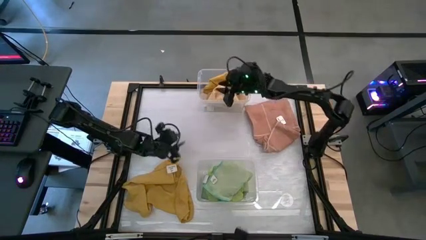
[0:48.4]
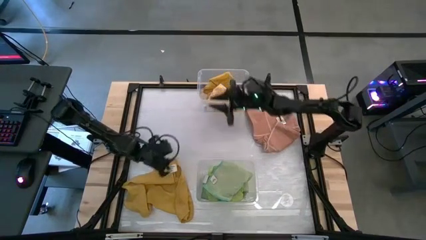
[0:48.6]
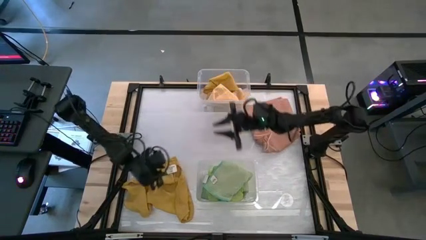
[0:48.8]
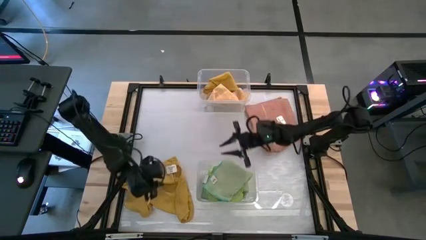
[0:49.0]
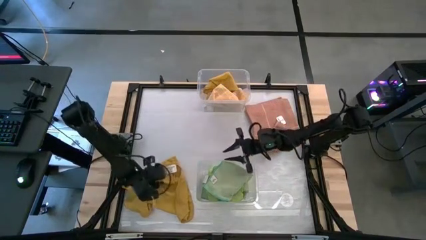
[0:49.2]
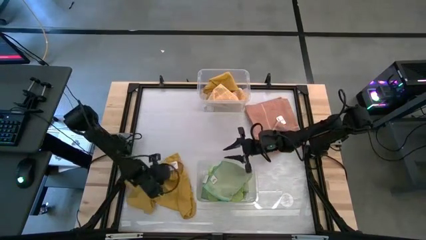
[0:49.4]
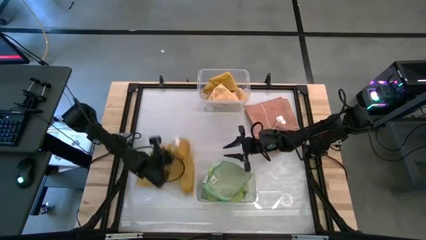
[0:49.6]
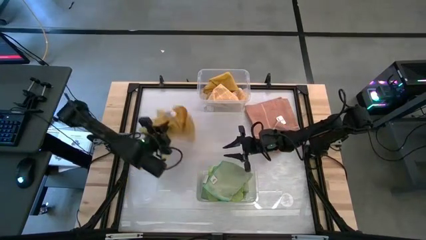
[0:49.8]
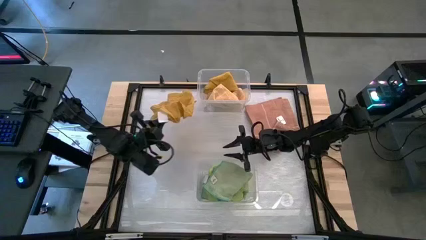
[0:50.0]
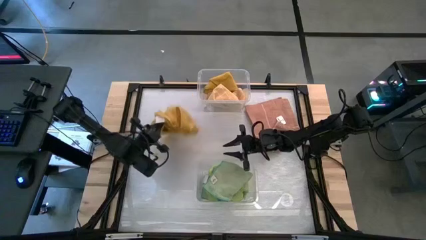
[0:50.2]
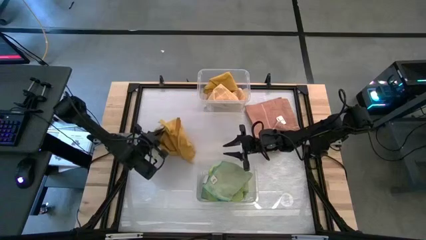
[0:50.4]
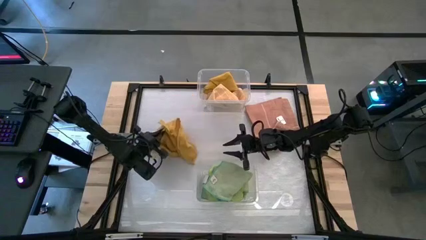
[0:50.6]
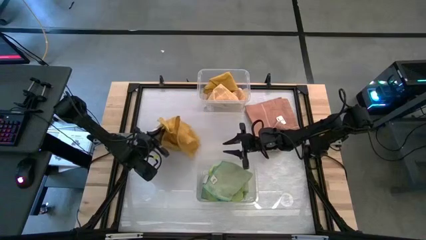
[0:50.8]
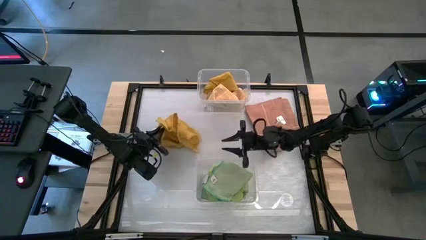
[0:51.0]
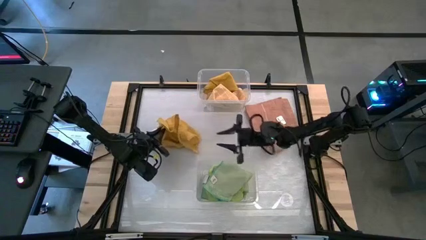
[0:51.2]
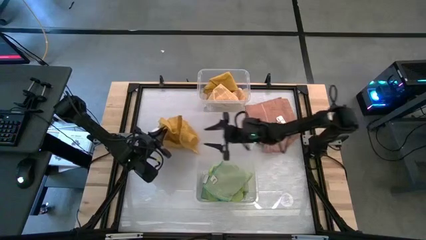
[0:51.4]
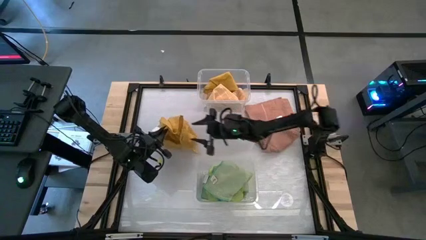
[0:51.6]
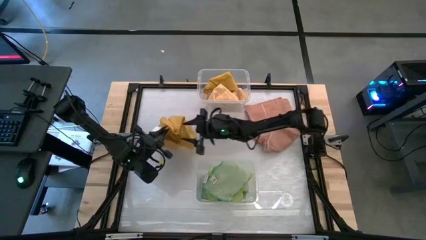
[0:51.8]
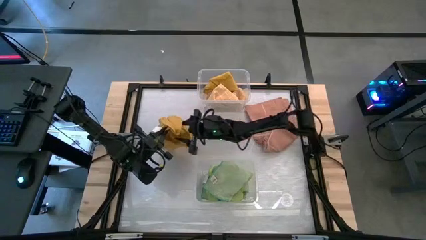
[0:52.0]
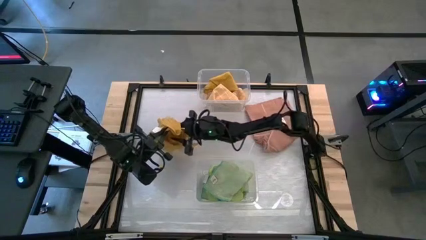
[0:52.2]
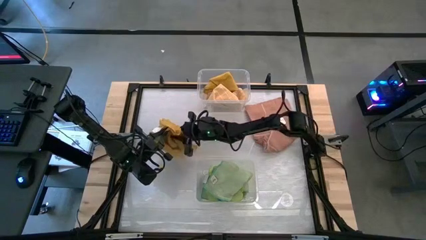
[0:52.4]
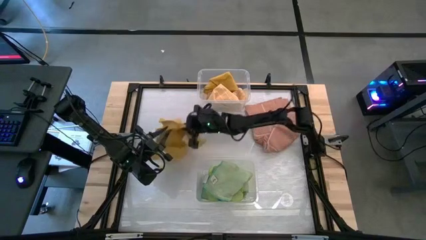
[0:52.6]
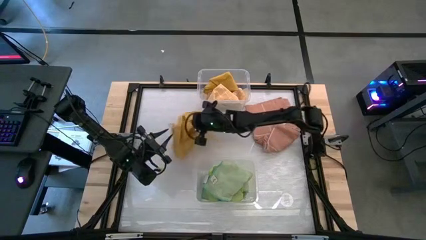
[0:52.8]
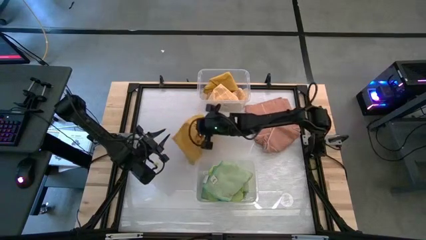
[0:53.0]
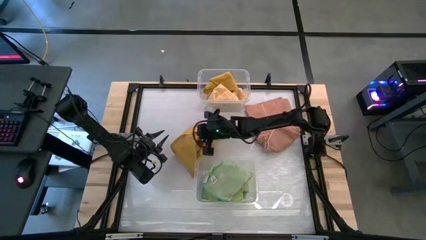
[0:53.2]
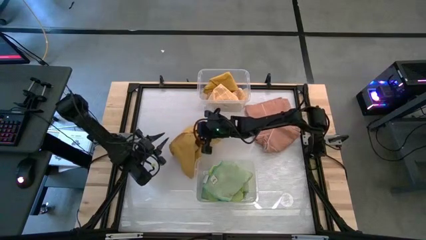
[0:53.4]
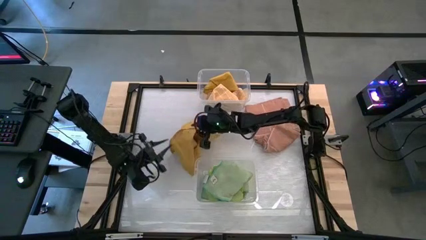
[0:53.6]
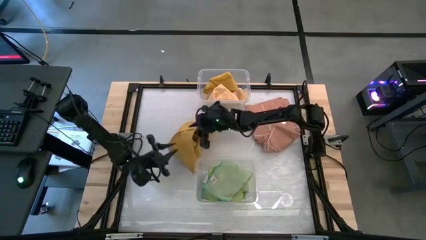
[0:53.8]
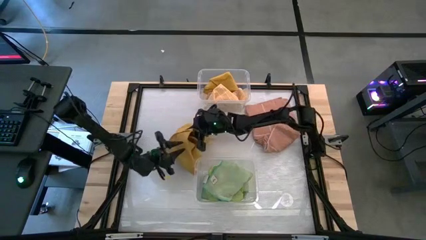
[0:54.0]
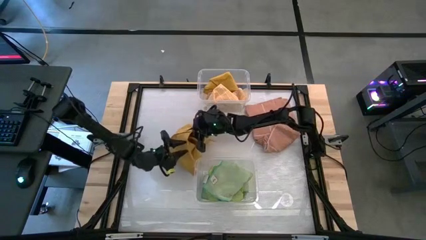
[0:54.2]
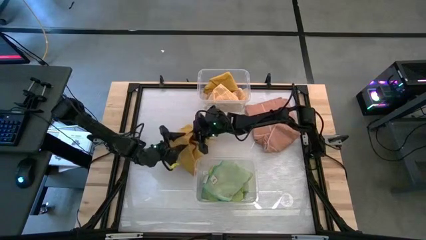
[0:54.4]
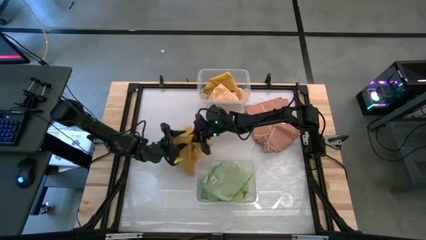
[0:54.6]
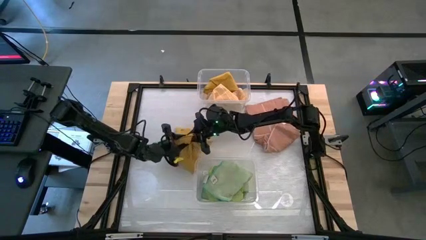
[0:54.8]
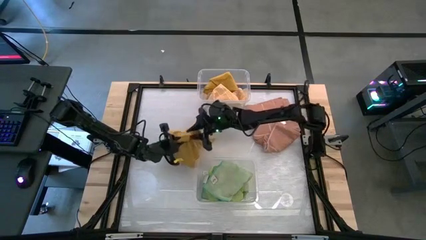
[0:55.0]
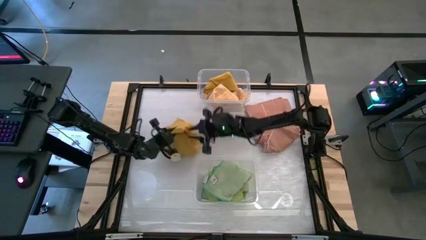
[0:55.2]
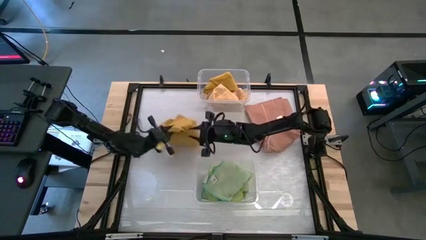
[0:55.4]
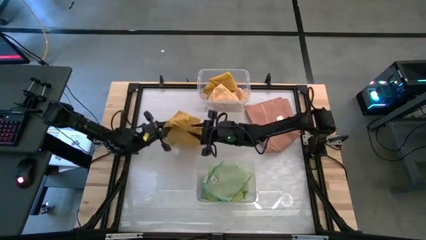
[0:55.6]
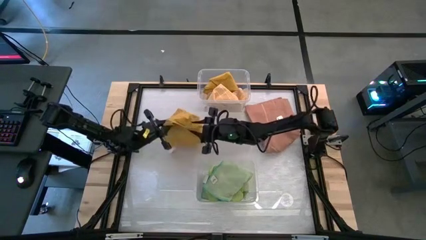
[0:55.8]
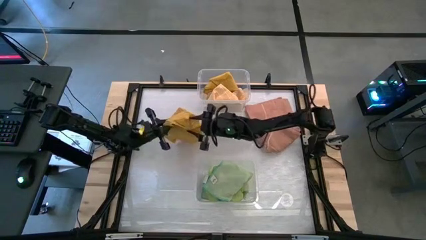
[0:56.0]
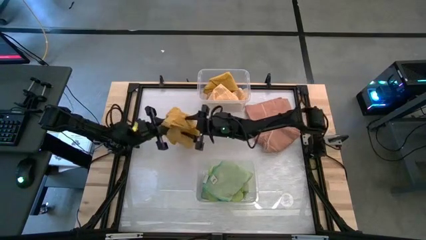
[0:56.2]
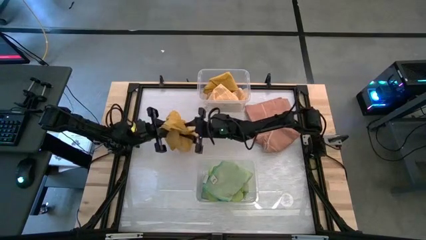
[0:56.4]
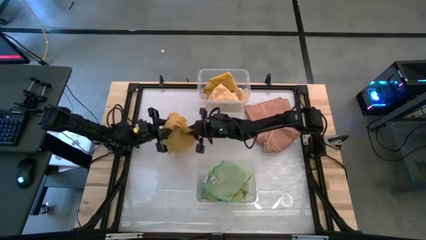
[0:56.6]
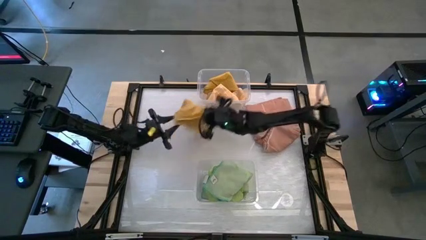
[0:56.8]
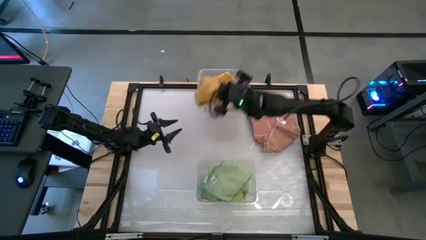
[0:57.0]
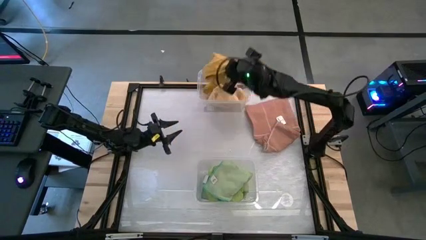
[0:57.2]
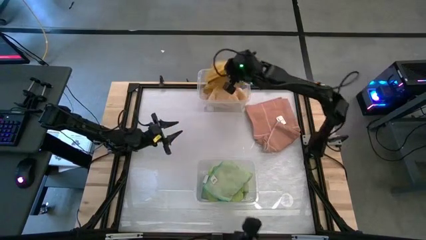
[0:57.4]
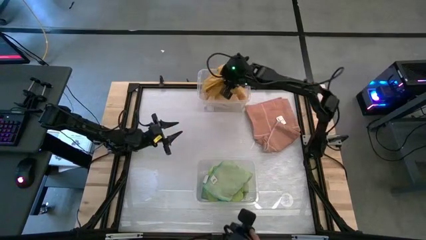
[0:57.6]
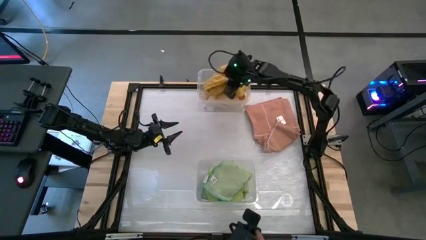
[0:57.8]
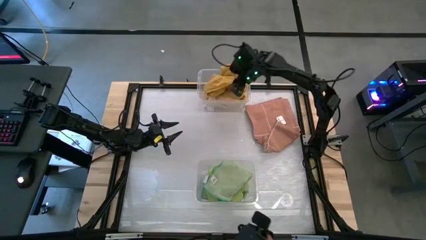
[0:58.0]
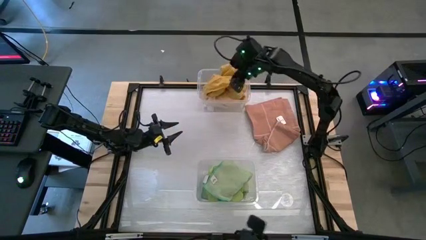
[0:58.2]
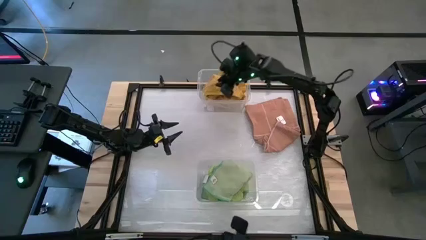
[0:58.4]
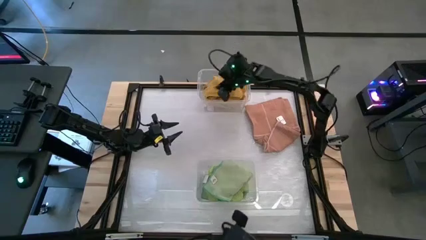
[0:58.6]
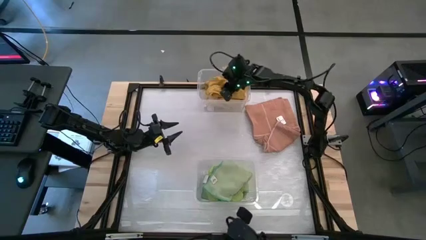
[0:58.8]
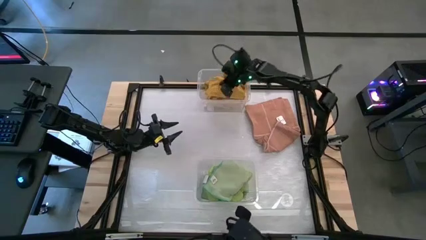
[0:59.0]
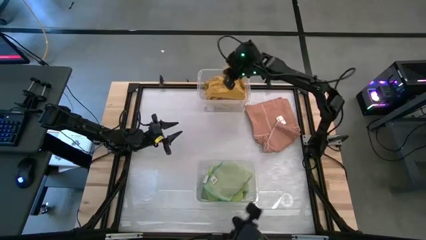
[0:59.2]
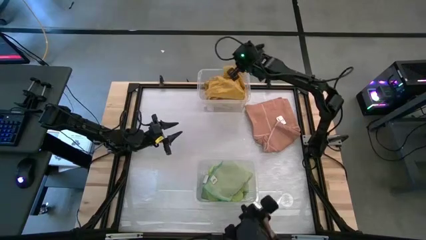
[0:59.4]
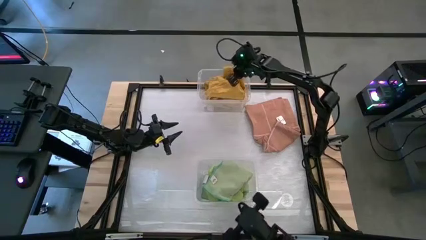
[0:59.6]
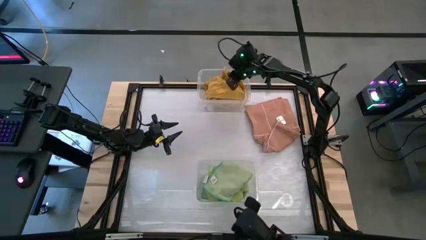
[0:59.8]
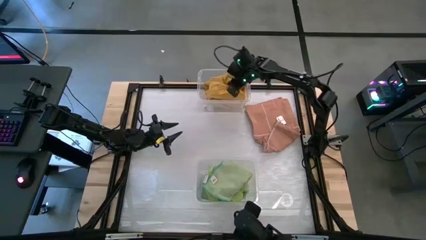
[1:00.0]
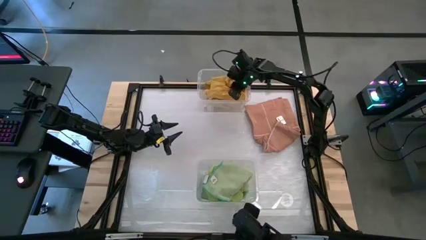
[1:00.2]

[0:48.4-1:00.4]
Task: Sort towels by color in basket
Put the yellow towel into the top transparent bin
